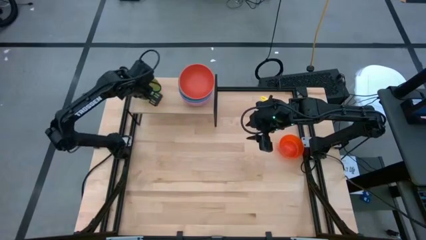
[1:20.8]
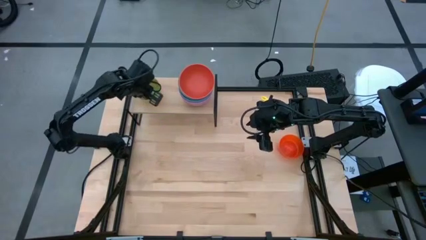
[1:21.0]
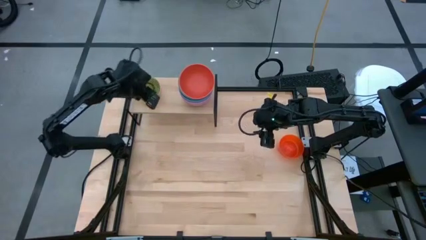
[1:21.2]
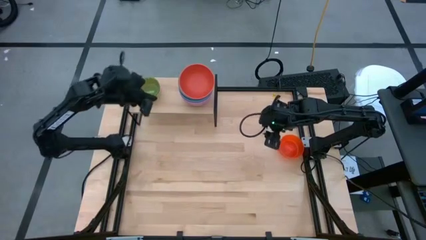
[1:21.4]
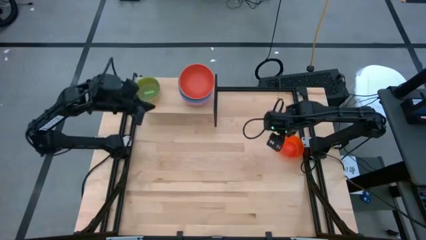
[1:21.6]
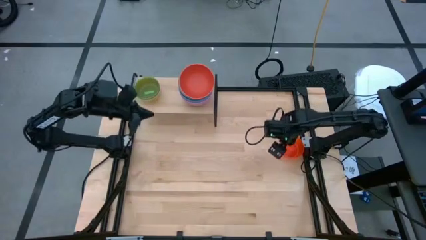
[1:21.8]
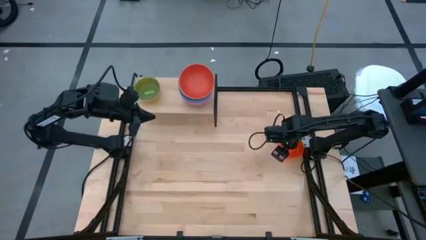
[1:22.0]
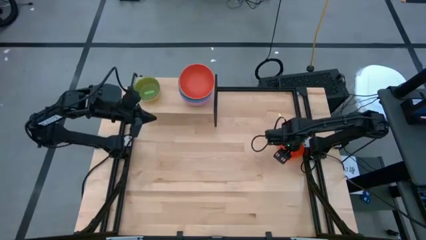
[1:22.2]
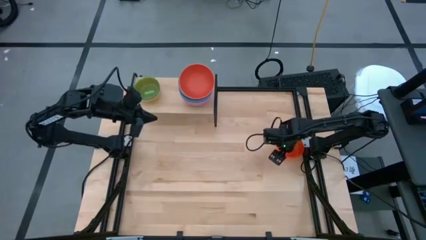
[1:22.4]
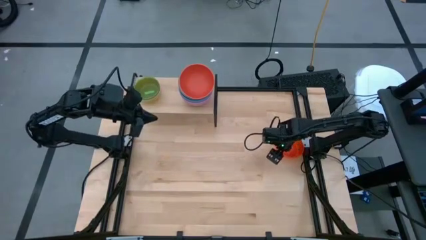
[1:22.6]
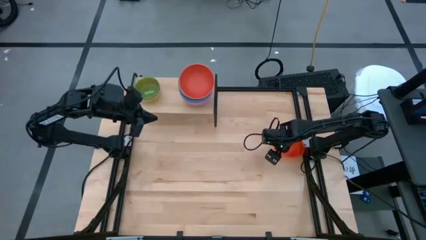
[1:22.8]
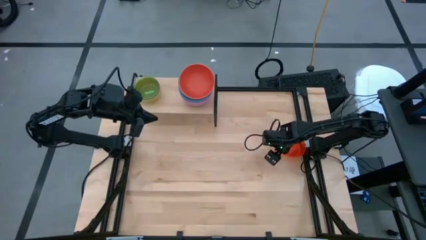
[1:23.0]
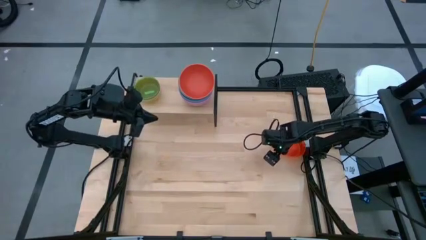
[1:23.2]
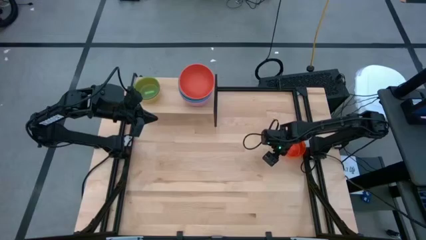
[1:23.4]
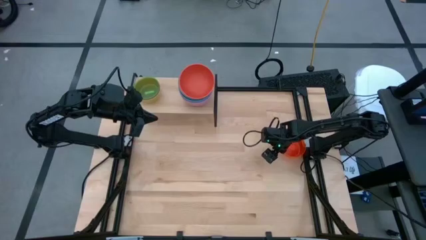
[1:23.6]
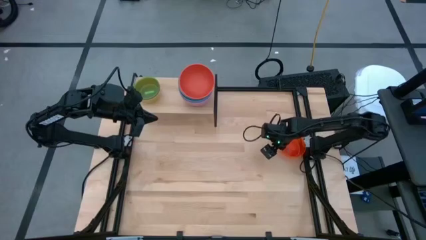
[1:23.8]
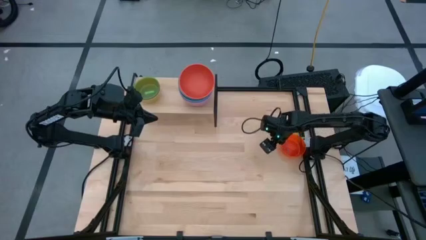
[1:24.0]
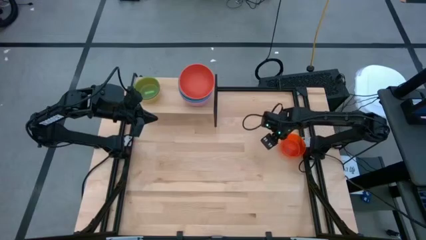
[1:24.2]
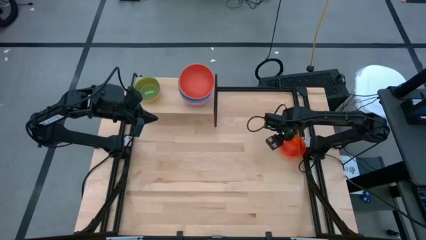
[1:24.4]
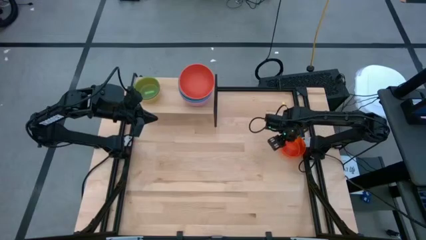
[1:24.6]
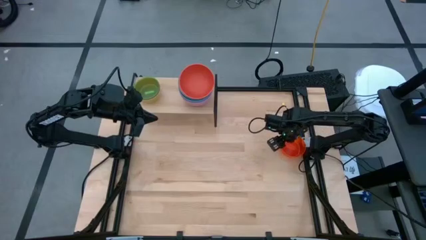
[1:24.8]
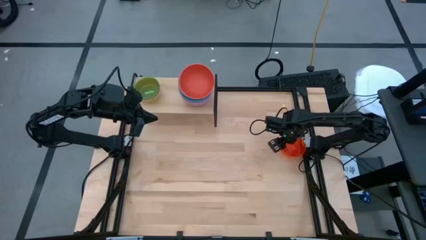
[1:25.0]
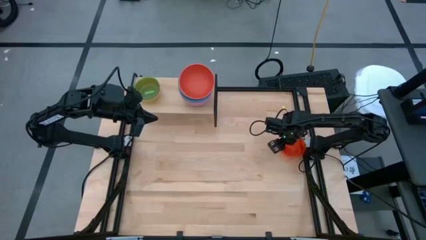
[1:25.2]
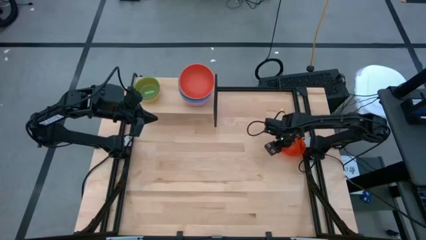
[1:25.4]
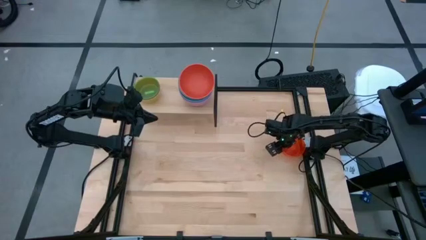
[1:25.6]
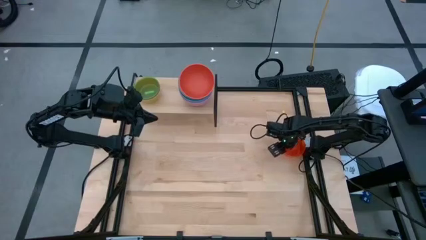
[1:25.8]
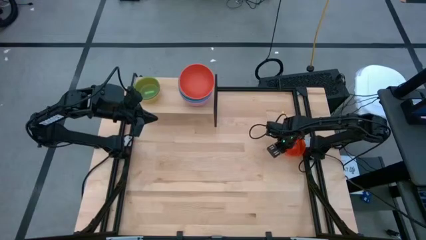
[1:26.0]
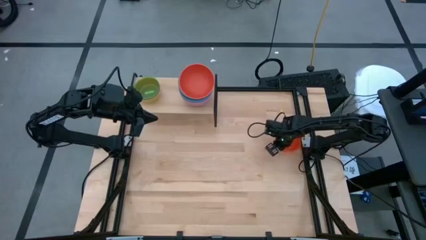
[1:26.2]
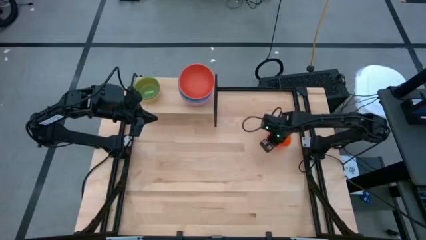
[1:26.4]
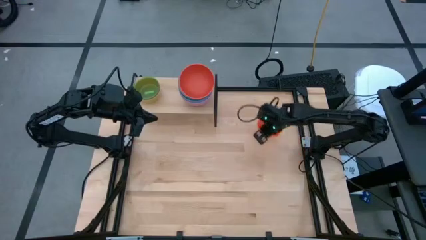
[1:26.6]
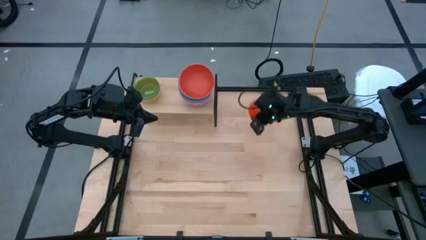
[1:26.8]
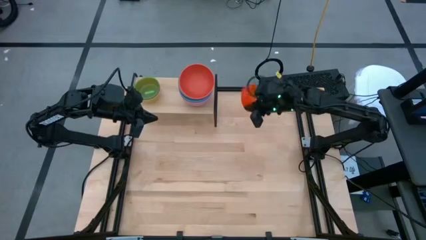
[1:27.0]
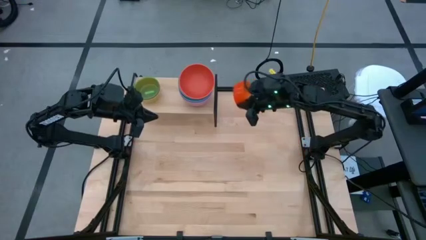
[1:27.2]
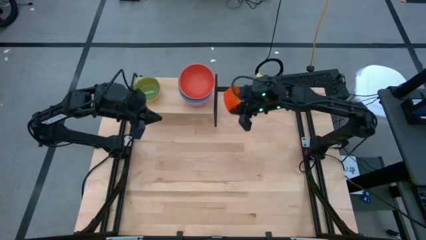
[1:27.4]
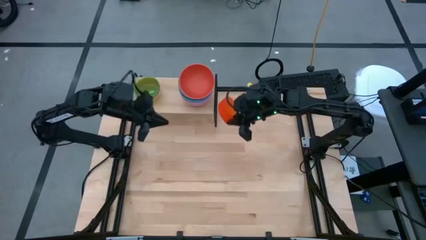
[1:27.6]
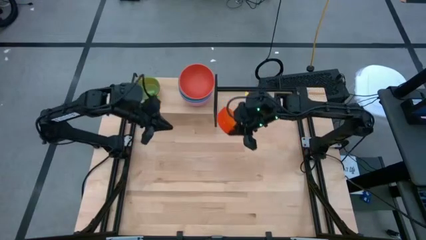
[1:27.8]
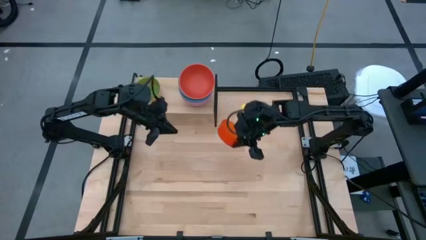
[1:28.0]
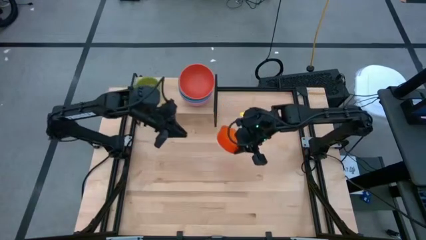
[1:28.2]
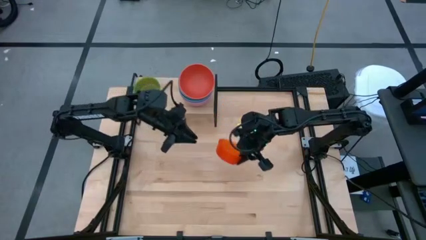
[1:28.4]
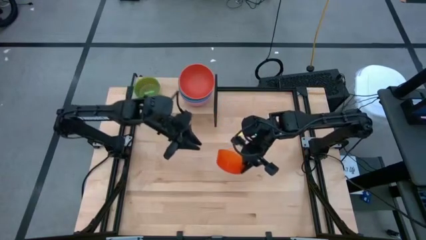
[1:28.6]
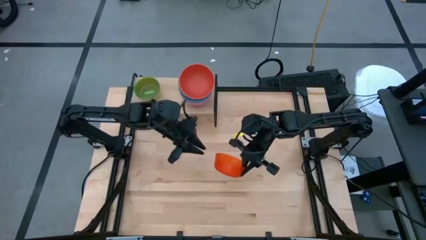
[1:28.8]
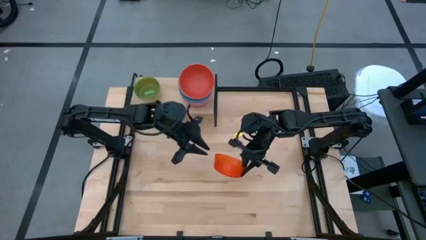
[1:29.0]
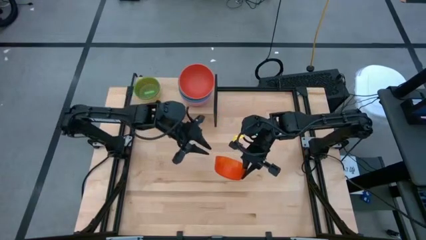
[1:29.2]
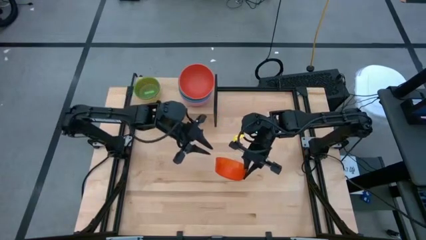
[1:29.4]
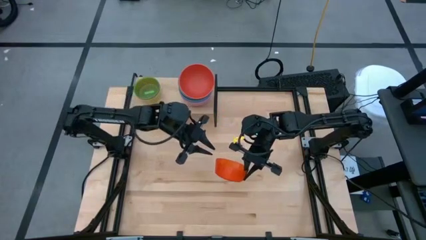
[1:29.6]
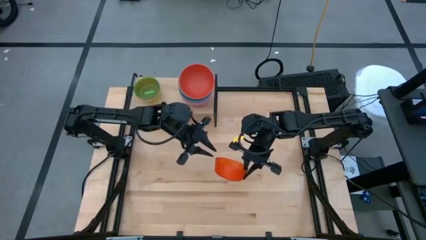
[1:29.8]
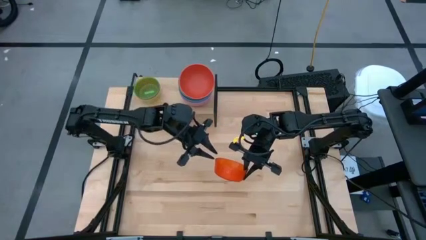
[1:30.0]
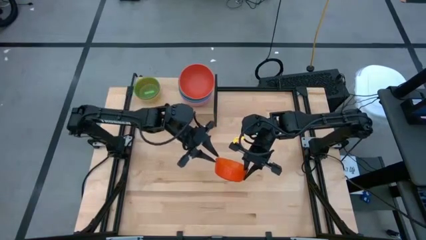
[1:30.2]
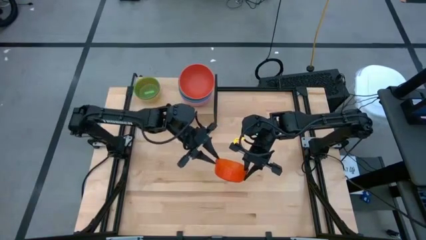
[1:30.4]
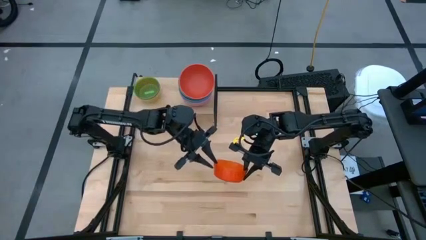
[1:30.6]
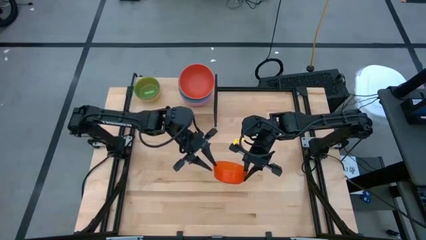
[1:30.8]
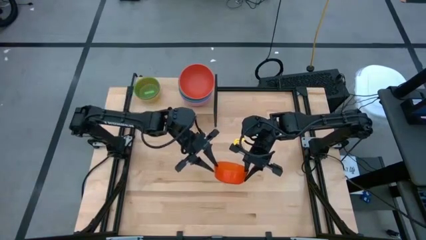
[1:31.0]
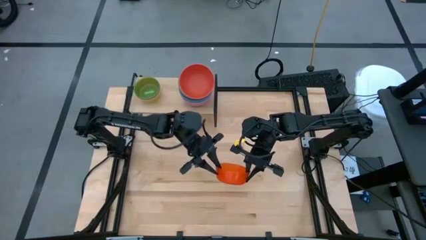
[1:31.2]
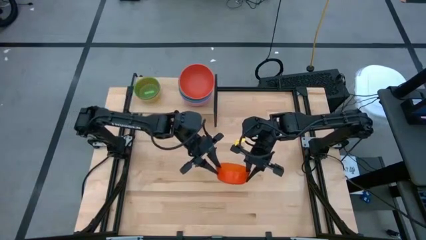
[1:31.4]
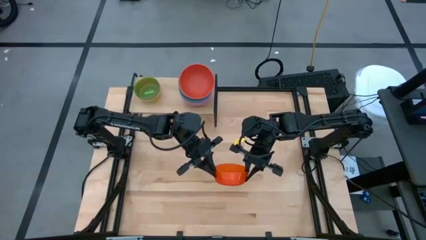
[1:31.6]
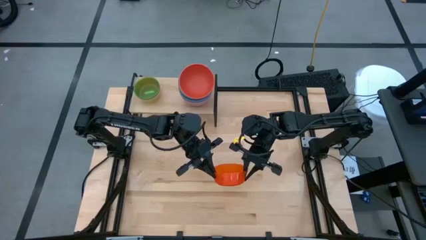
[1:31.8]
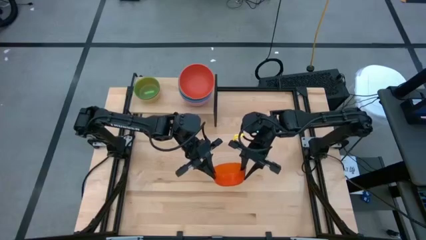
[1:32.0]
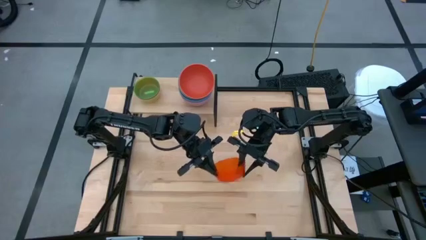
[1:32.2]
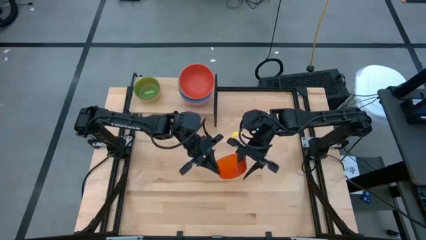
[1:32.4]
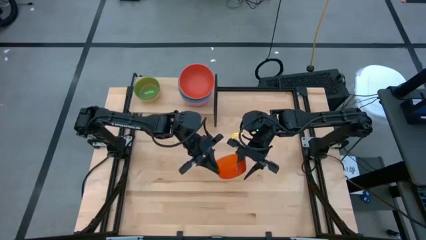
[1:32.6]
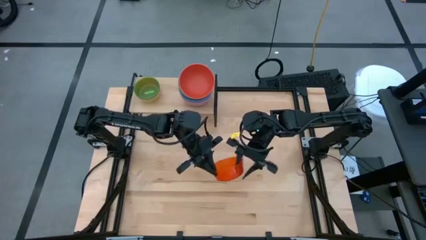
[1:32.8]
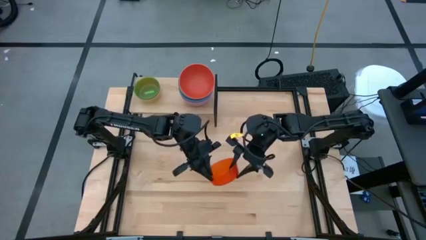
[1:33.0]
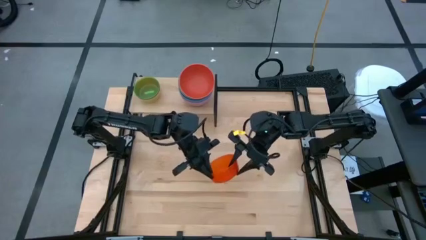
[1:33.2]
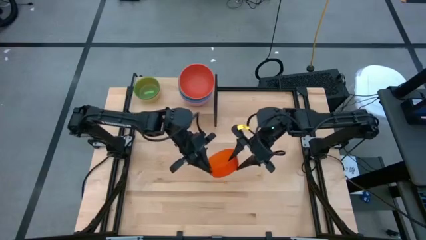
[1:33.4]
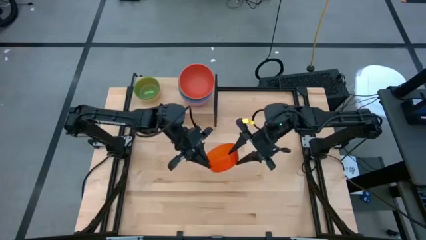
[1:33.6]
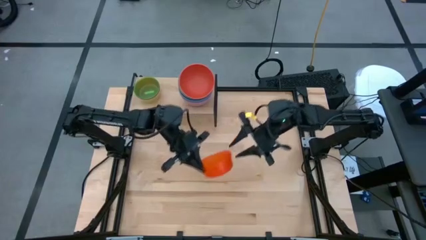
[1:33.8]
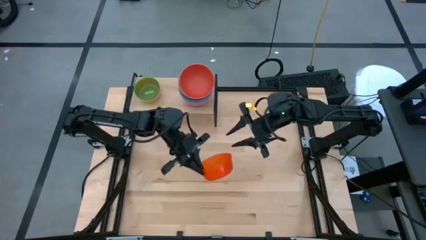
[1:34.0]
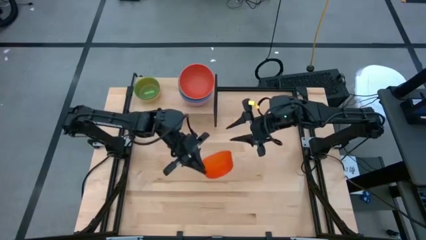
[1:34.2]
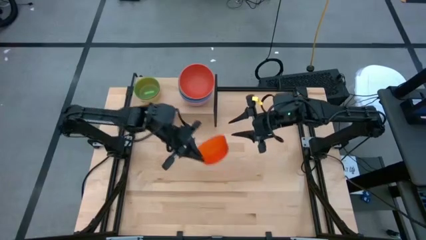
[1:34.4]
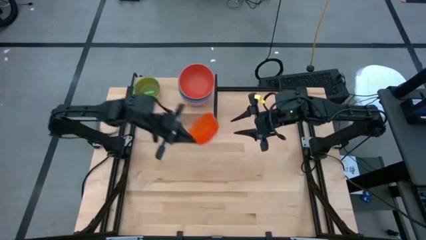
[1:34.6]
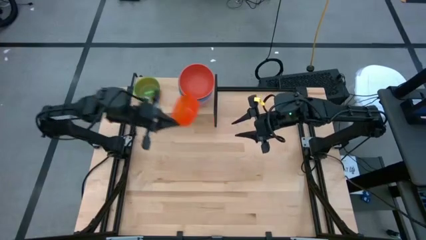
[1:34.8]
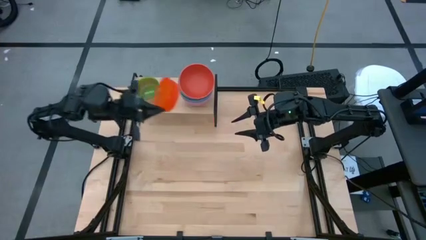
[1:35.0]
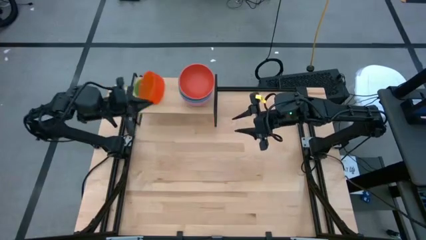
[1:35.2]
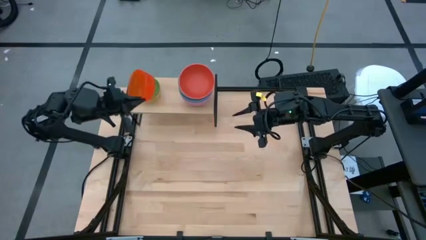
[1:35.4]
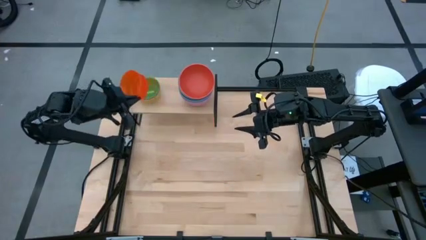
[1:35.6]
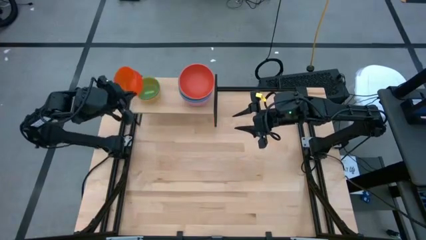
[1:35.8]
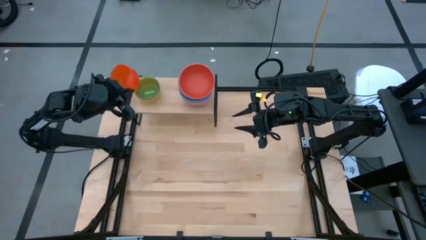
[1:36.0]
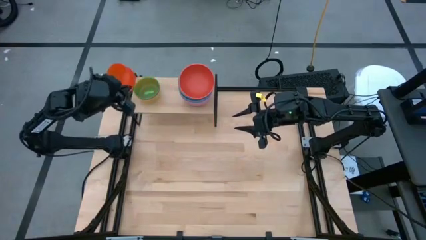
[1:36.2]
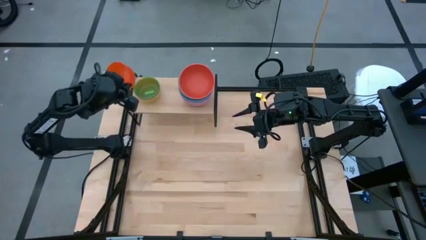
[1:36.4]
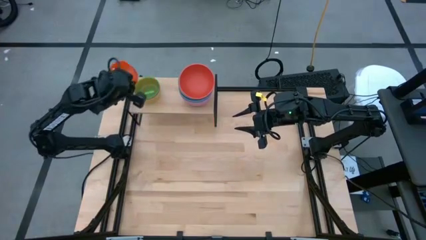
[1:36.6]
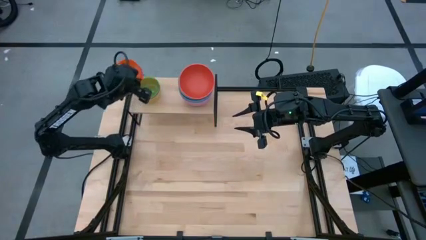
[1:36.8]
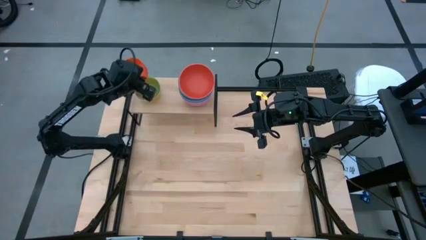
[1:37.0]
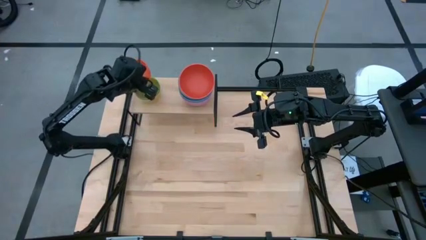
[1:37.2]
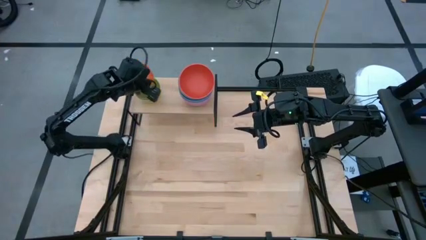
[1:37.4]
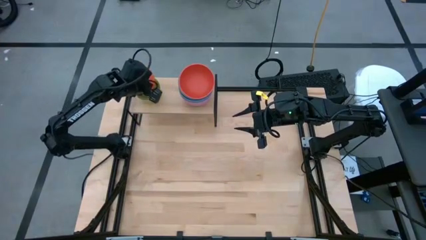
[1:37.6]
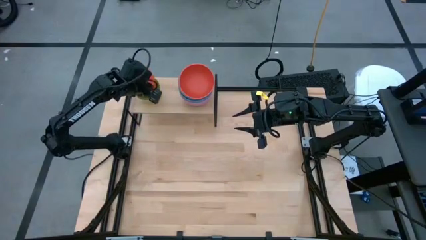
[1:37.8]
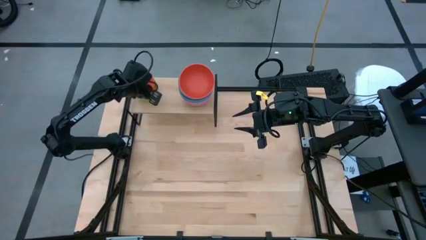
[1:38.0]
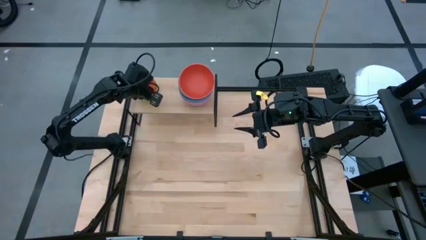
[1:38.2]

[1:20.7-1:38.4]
Task: Place and stack bowls onto a shelf
Stack the light orange bowl on the green bowl on the shelf
